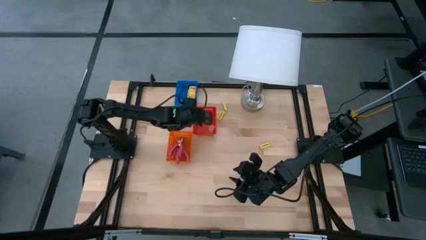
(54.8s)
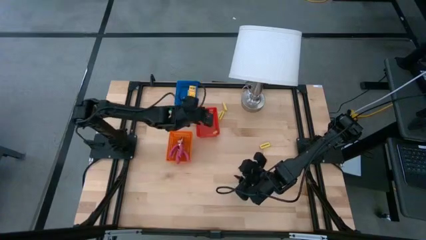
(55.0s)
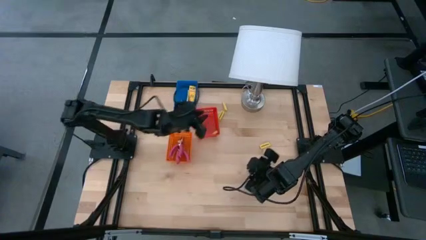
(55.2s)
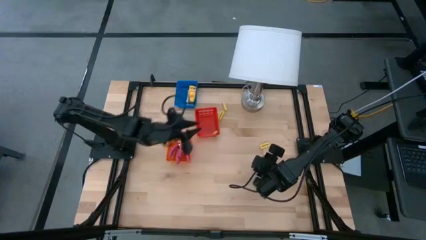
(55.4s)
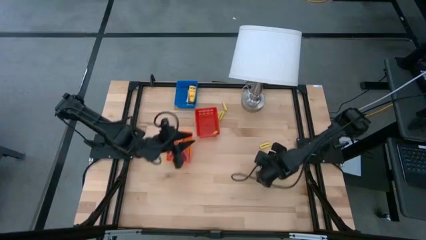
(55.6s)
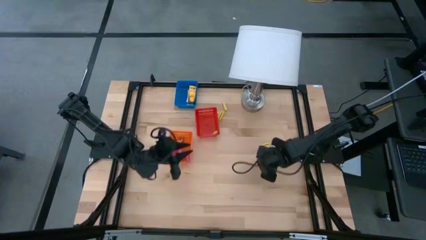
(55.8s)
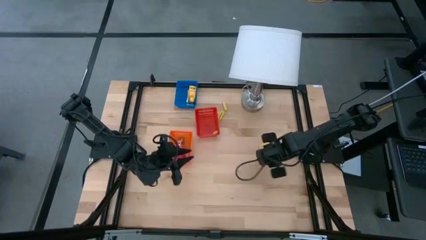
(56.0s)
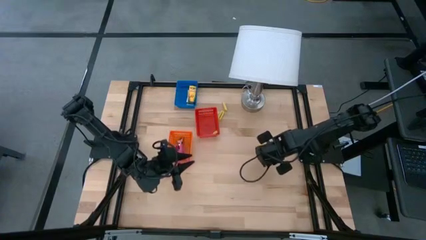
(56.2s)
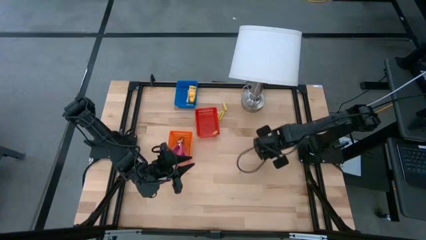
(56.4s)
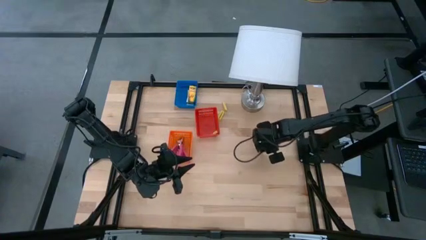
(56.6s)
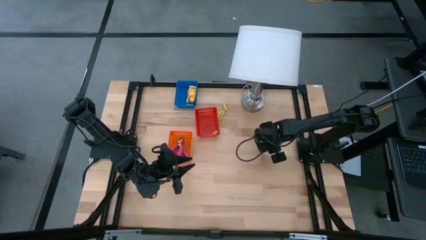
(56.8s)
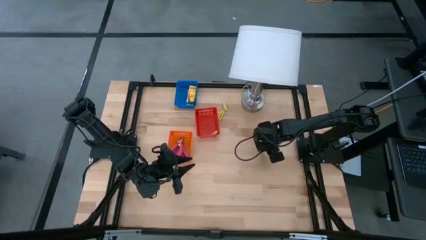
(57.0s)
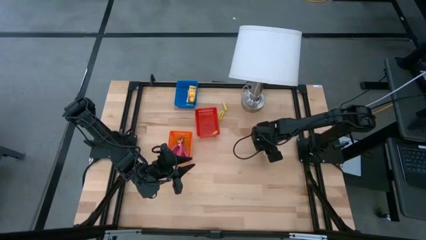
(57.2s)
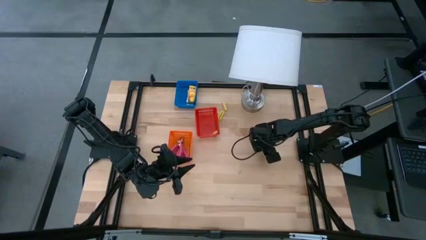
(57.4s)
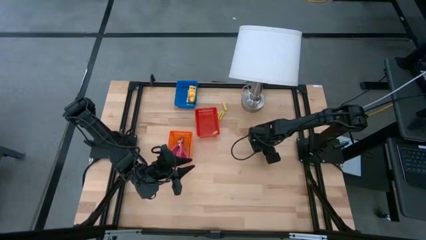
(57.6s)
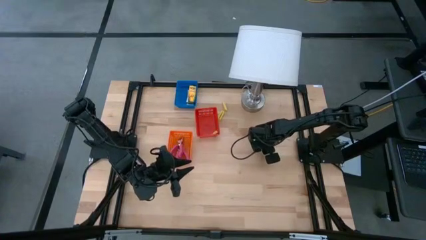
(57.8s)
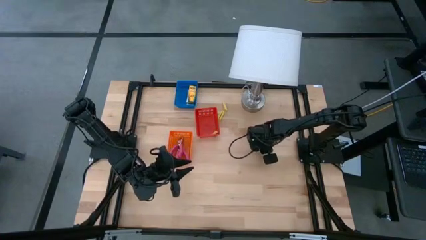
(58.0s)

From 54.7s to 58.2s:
Task: Pick & Place School Supplies
Put the yellow eraser into the red bin

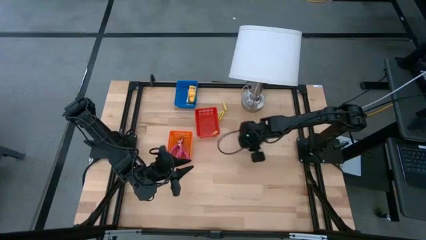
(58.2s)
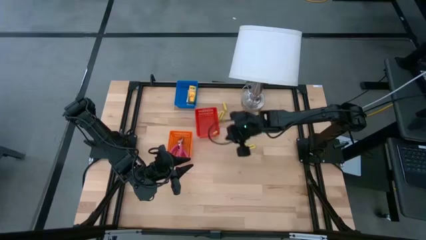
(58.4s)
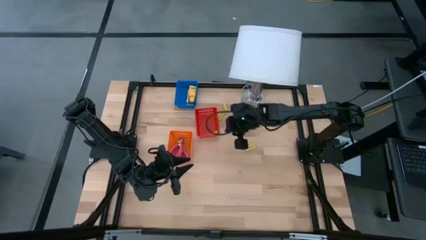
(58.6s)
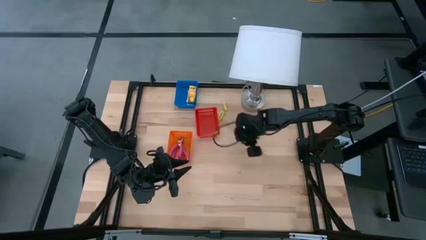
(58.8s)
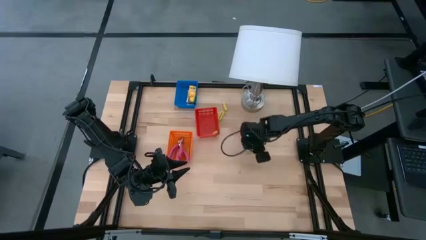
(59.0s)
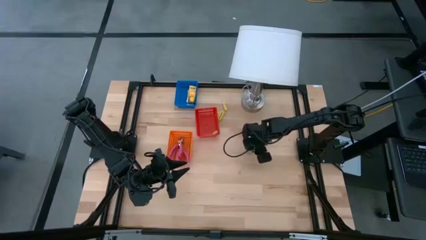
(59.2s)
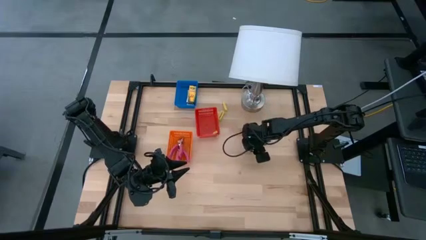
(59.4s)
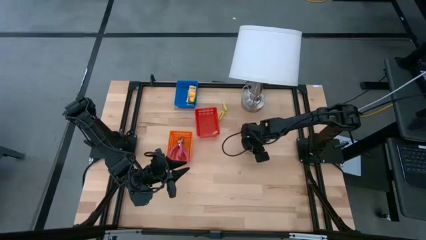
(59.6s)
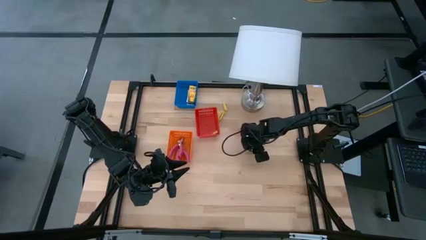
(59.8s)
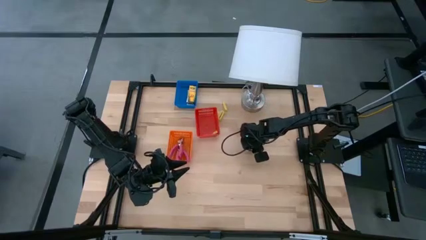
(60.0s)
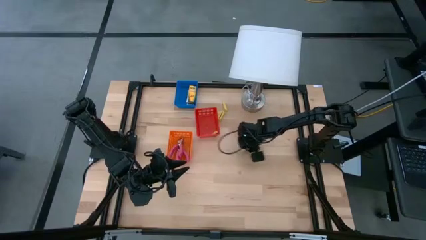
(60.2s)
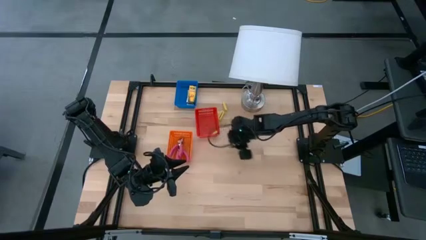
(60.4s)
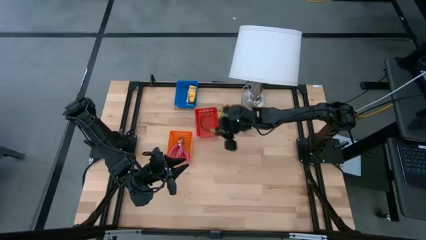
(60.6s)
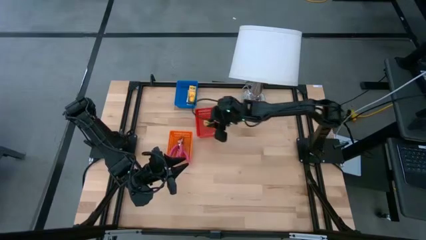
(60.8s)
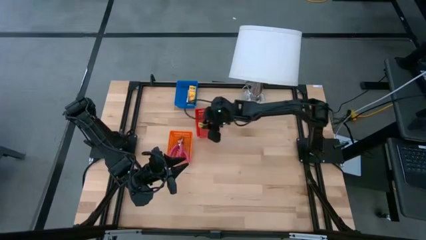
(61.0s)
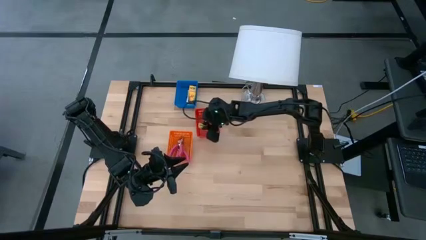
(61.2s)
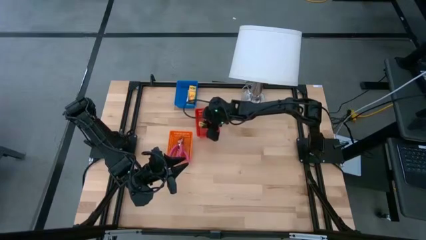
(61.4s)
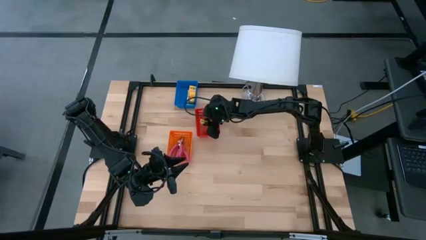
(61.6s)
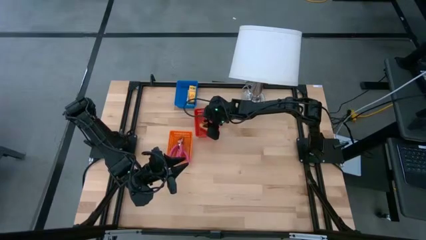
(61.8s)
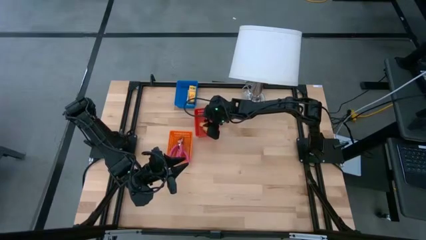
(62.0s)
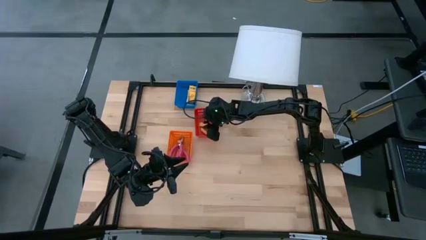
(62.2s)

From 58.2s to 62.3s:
Put the yellow eraser into the red bin

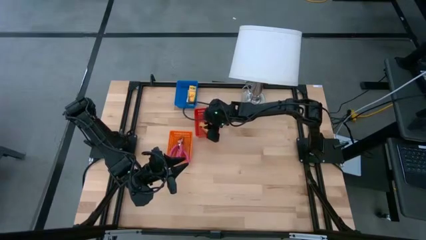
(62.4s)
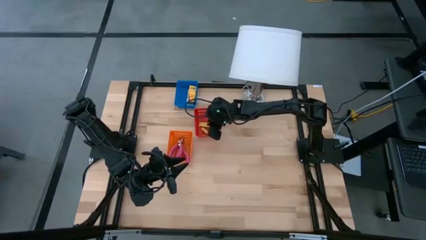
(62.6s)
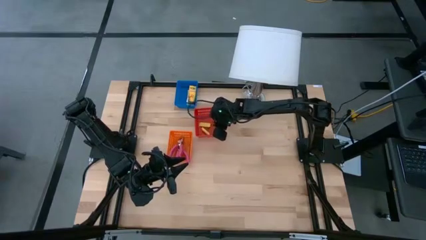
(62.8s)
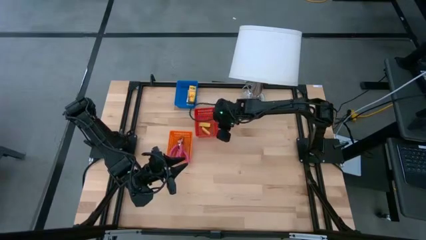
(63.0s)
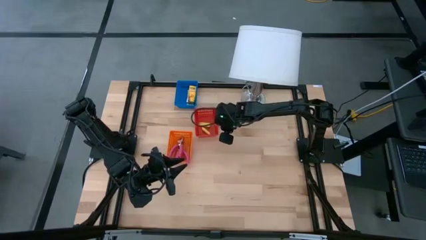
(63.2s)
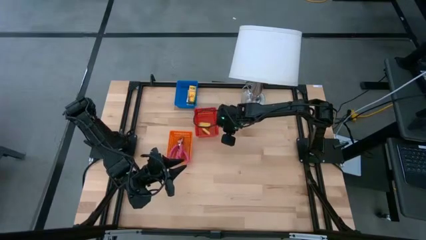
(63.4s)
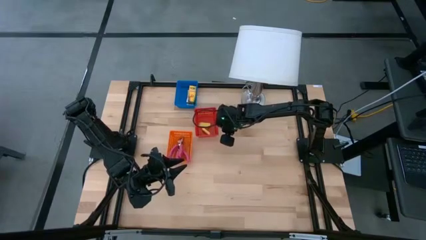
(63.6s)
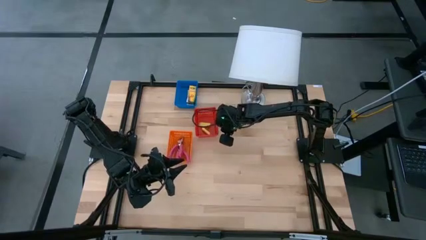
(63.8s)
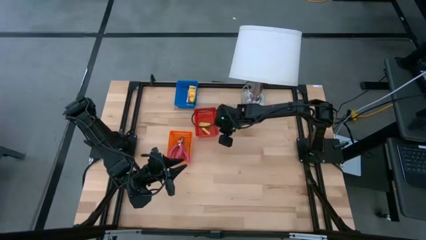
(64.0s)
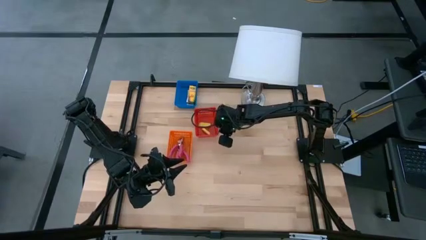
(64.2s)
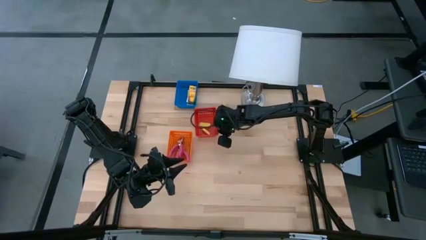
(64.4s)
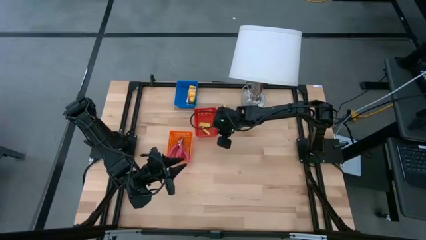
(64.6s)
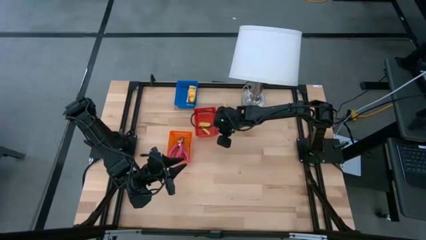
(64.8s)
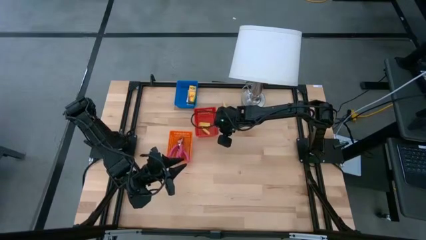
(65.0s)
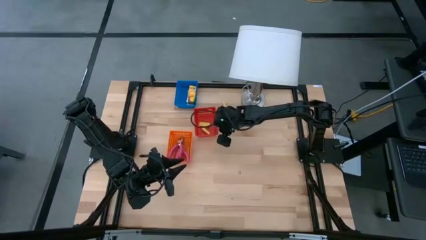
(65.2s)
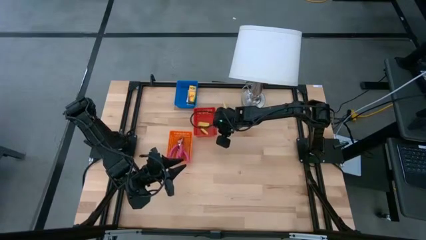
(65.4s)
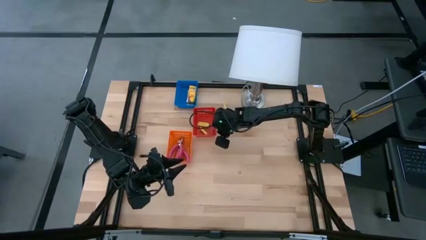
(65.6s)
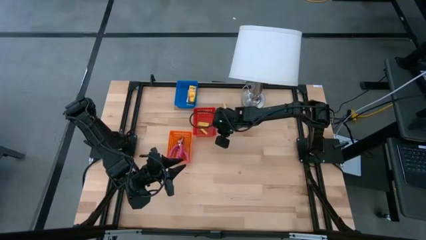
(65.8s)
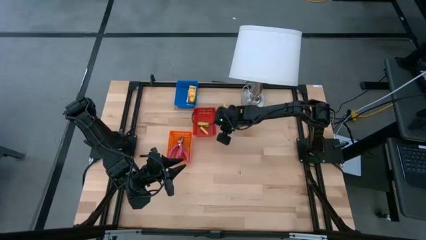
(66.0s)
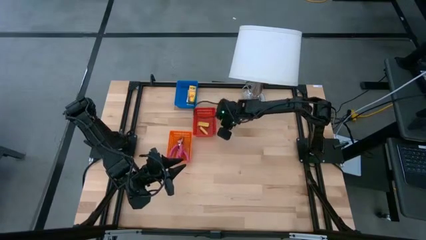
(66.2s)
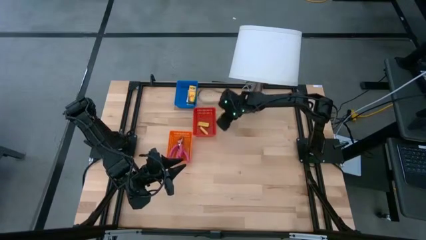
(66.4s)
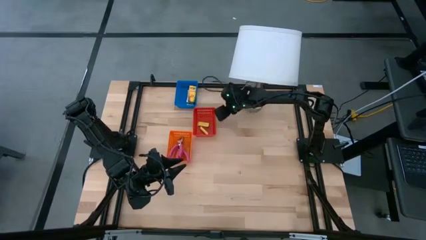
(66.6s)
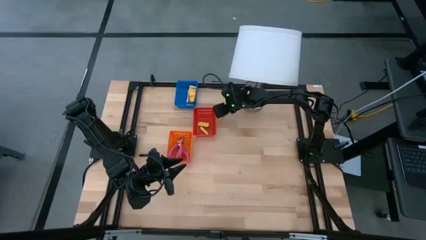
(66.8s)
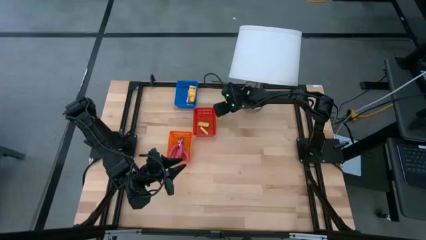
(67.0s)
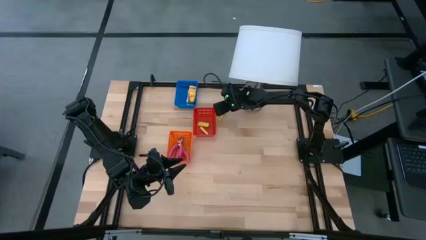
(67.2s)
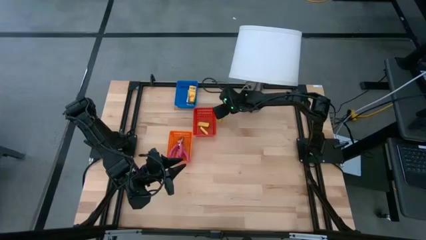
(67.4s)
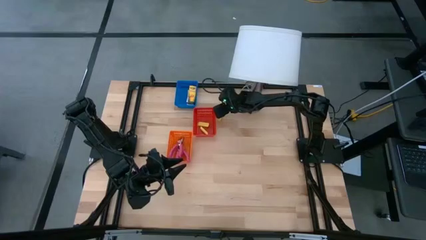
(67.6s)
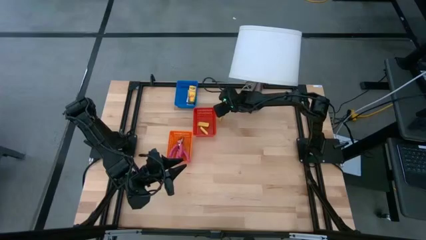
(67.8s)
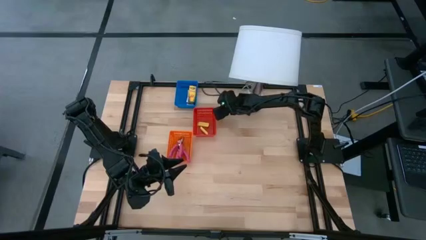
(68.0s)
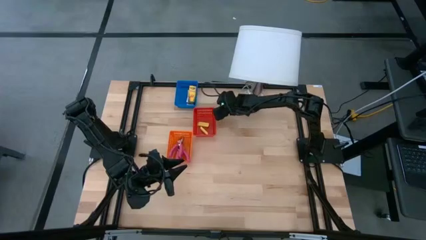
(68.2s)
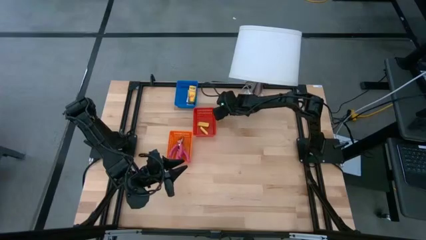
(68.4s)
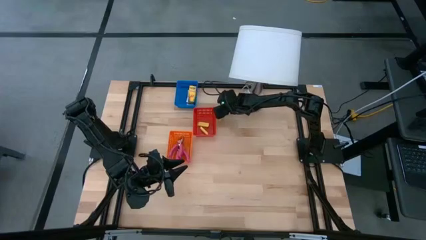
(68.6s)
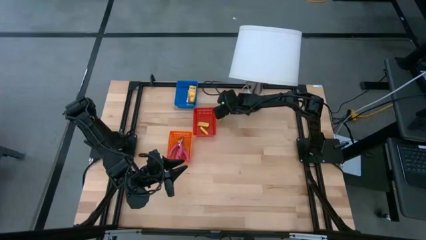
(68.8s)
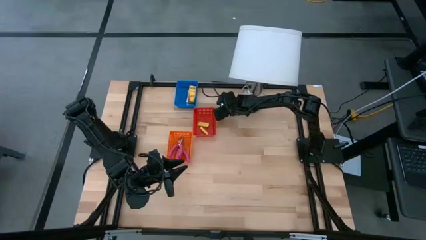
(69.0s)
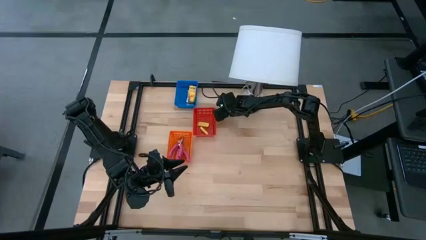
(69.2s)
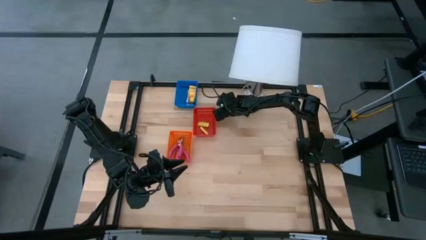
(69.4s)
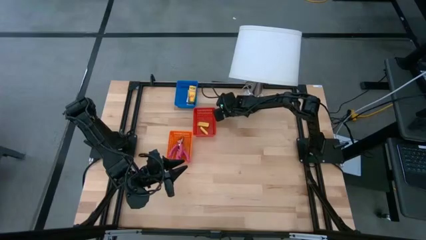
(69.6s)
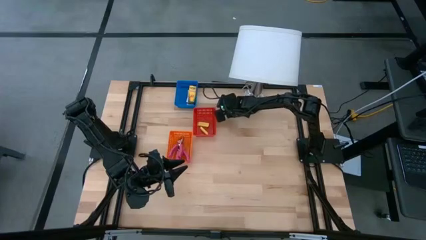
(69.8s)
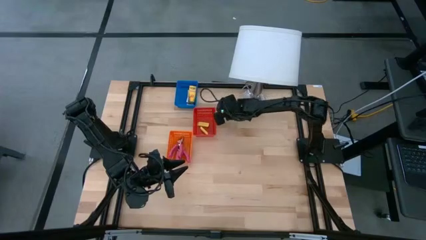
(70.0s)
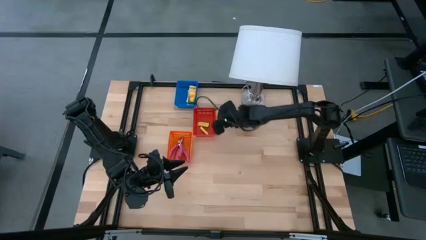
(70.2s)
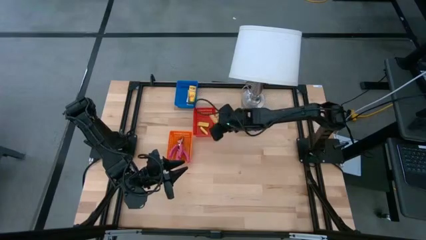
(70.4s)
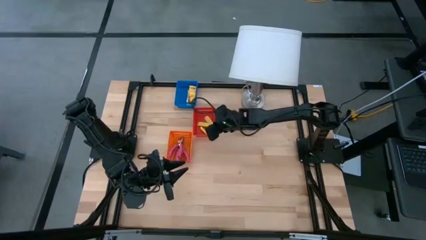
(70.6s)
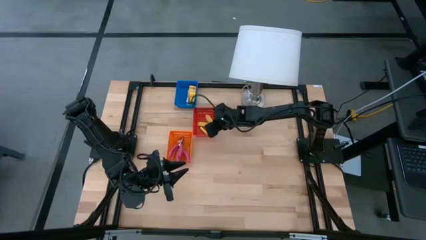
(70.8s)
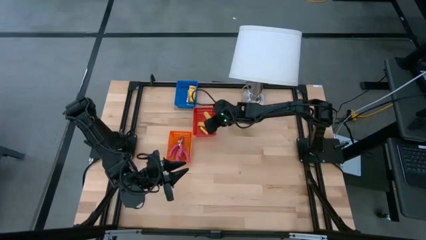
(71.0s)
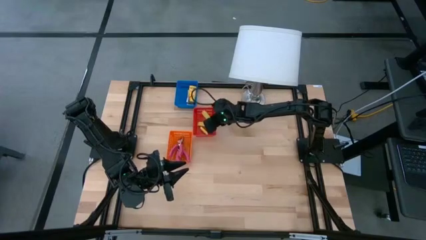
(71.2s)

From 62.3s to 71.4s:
Put the yellow eraser into the red bin

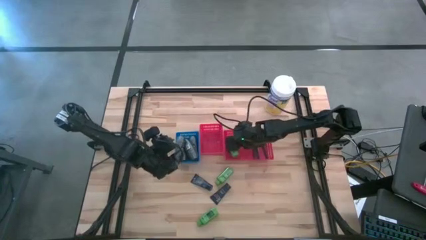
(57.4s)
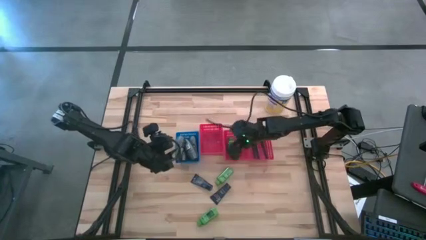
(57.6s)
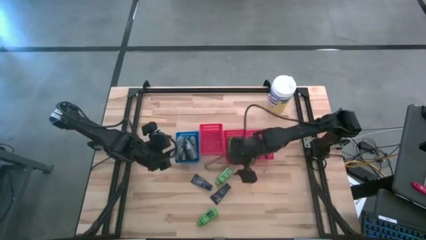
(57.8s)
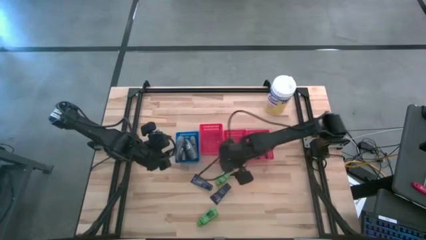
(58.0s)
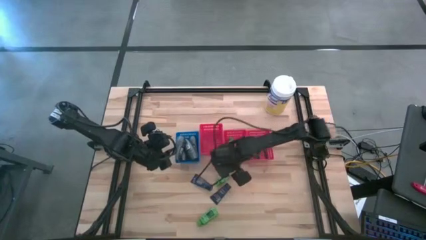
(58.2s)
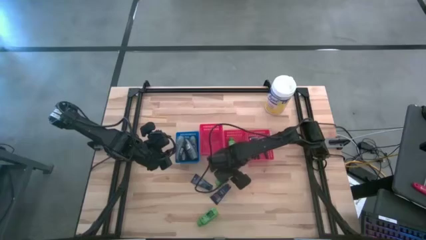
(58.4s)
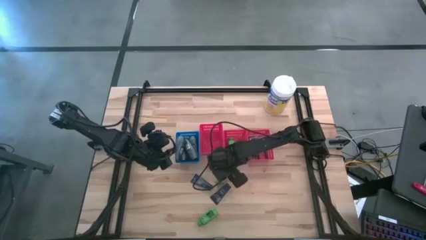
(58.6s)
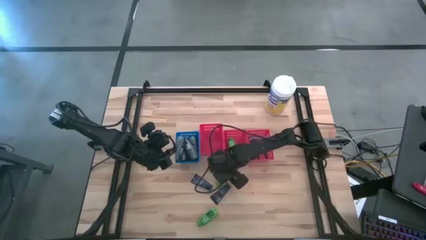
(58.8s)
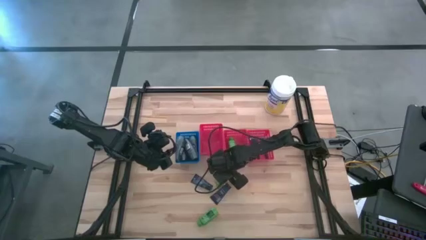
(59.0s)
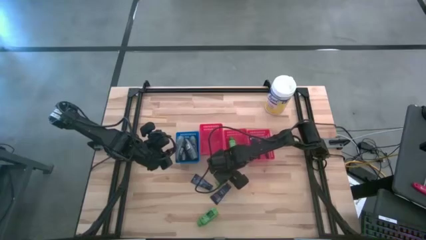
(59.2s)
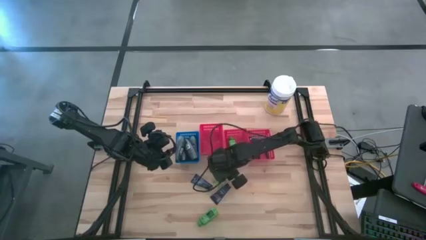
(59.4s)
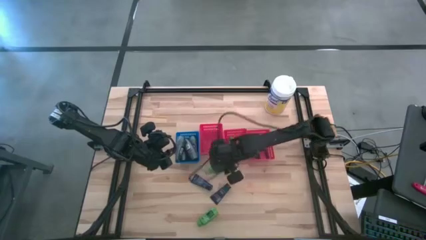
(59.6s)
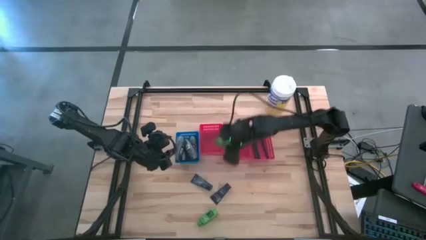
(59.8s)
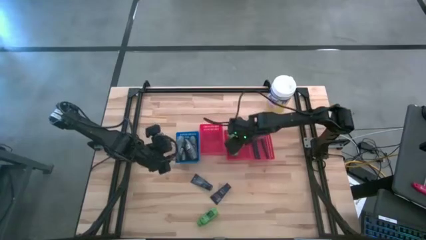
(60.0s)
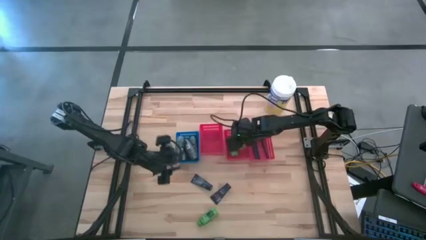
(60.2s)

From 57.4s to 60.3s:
Task: Pick & Place Travel size toiletries
Put the green shampoo into the middle red bin
